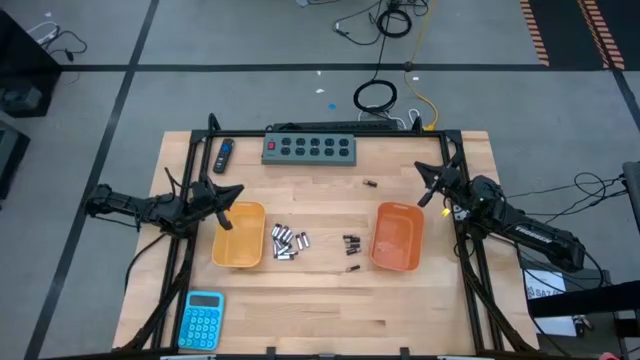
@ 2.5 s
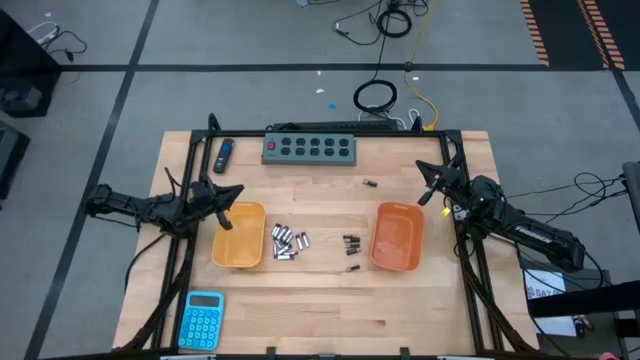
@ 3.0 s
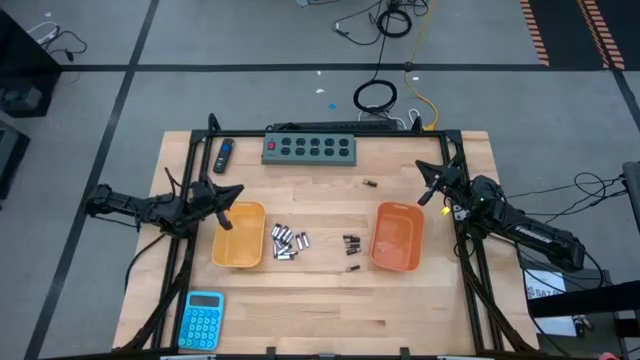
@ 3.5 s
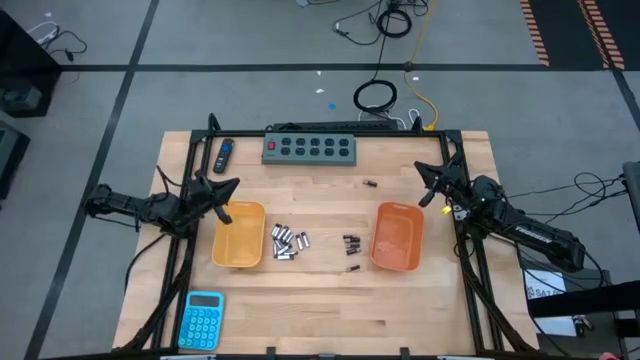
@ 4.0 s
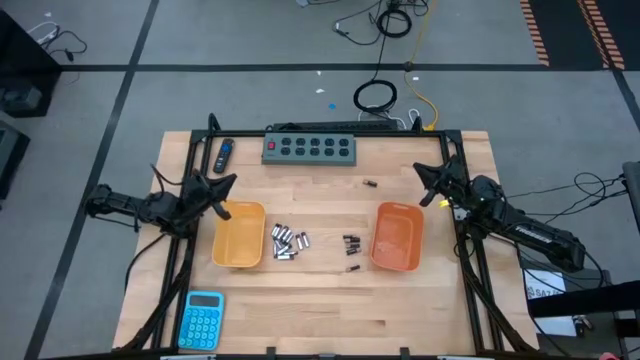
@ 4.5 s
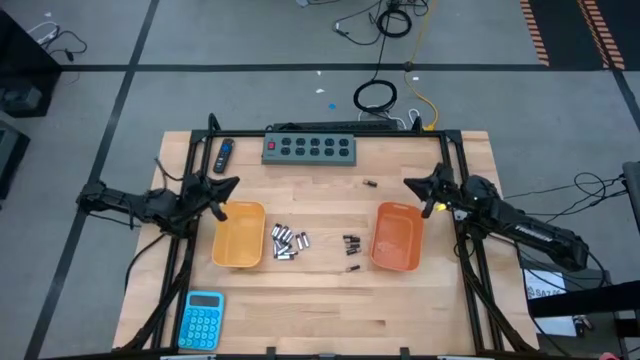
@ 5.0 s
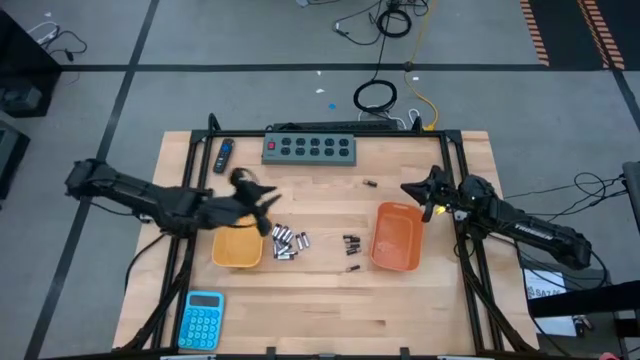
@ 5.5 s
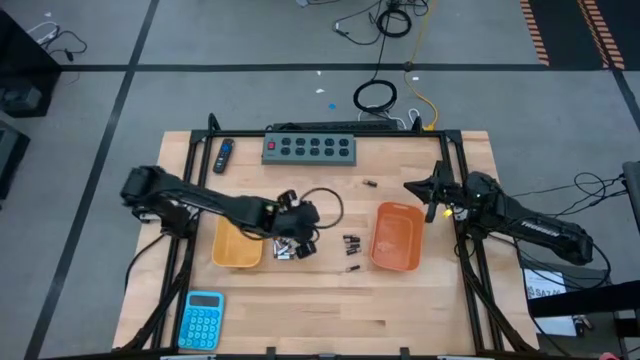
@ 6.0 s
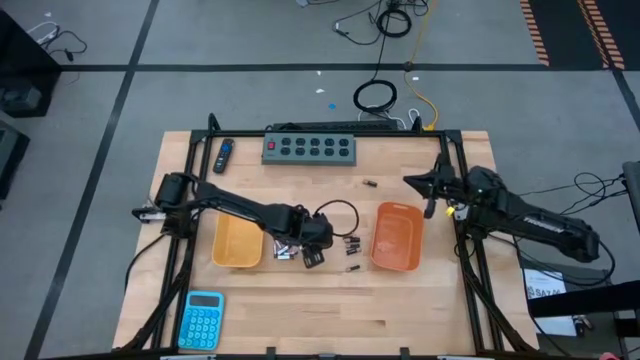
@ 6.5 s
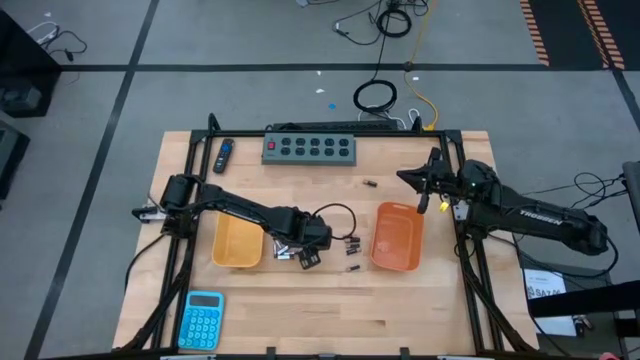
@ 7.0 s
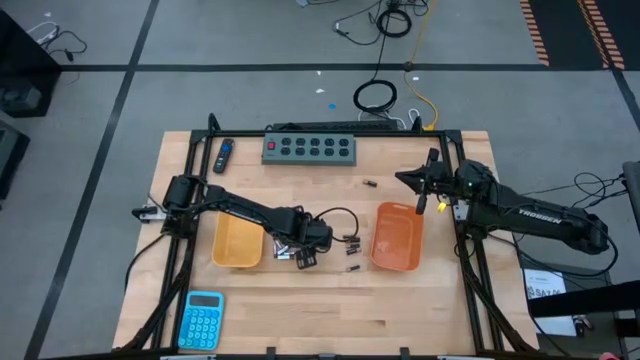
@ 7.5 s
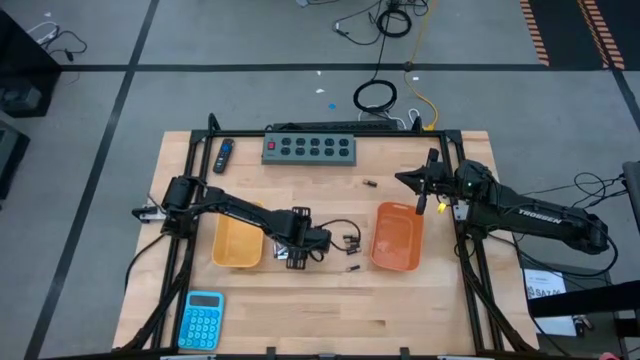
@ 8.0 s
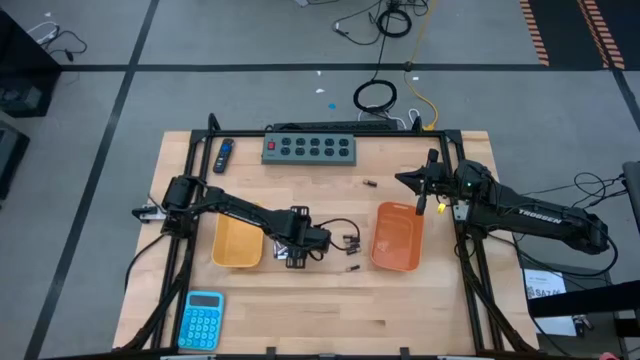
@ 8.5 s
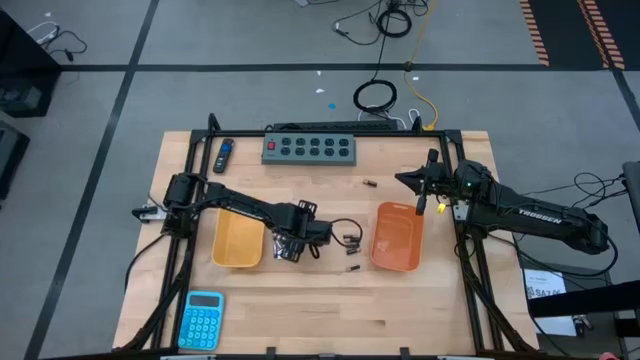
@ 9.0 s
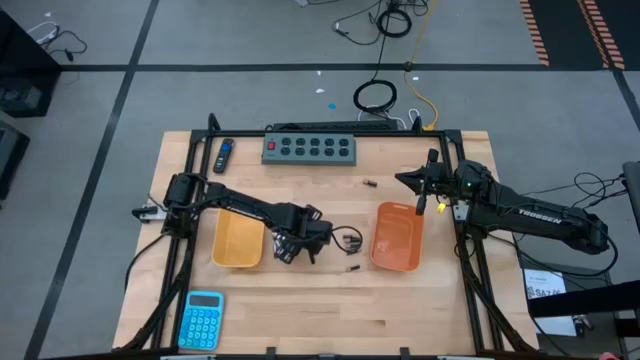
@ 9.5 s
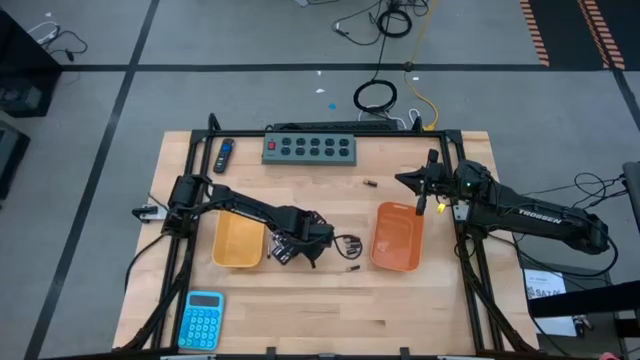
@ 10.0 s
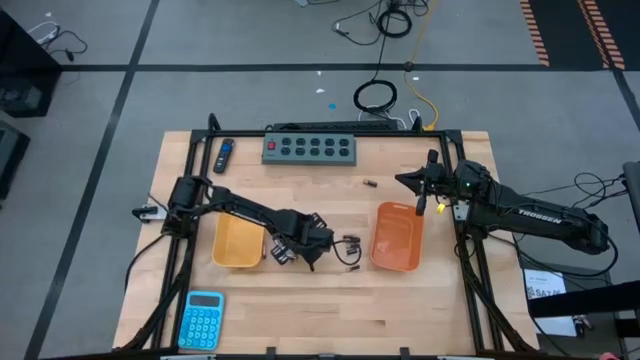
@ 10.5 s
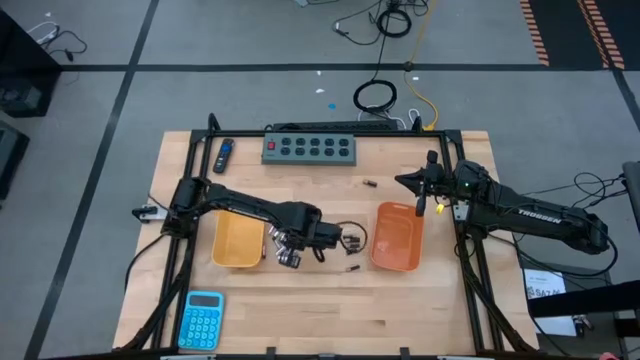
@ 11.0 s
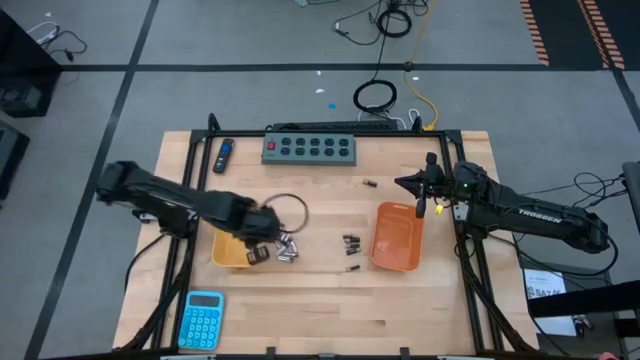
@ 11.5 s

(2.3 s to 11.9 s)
Task: Sort batteries
Put the silver battery into the yellow bin

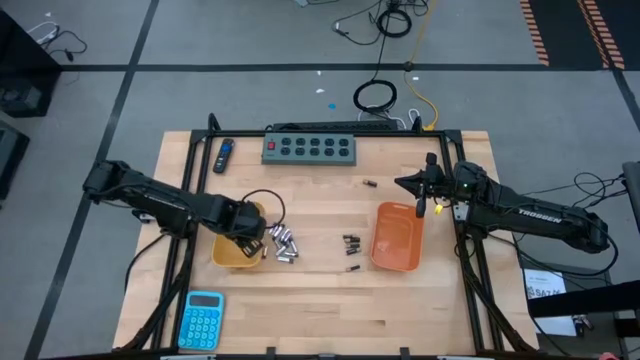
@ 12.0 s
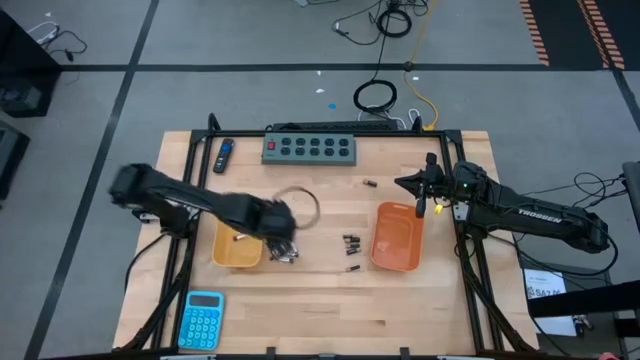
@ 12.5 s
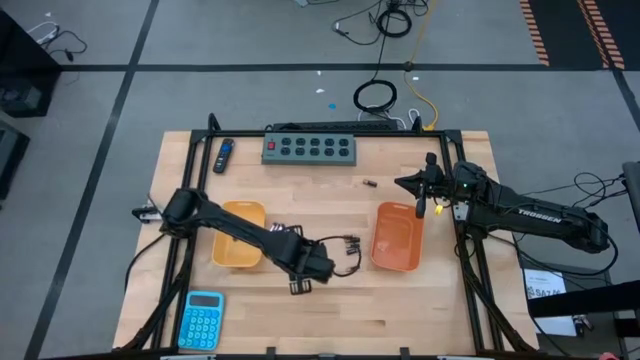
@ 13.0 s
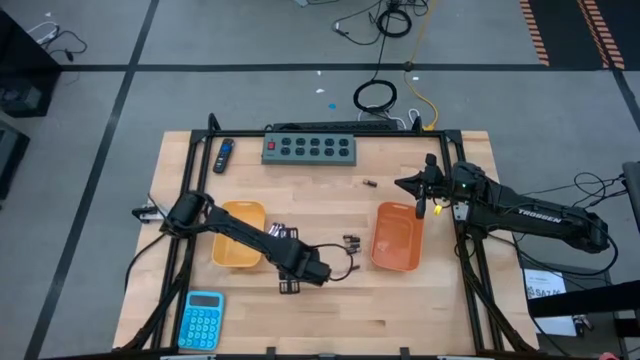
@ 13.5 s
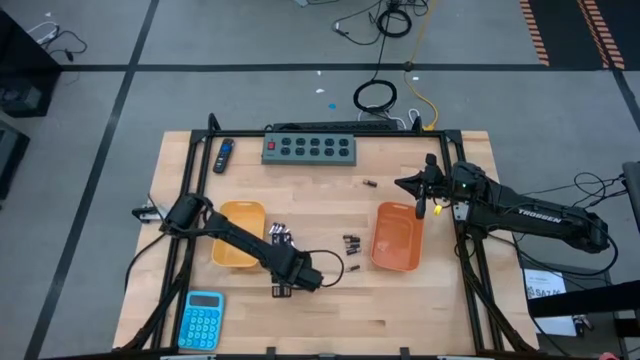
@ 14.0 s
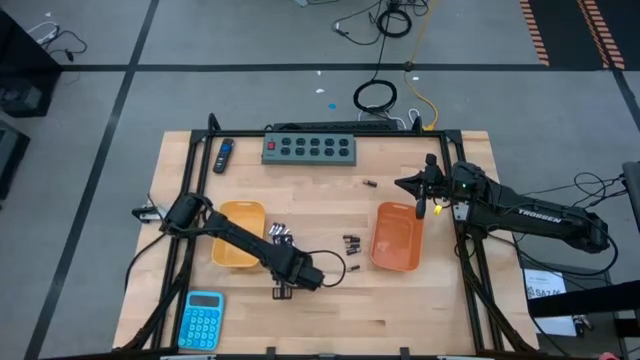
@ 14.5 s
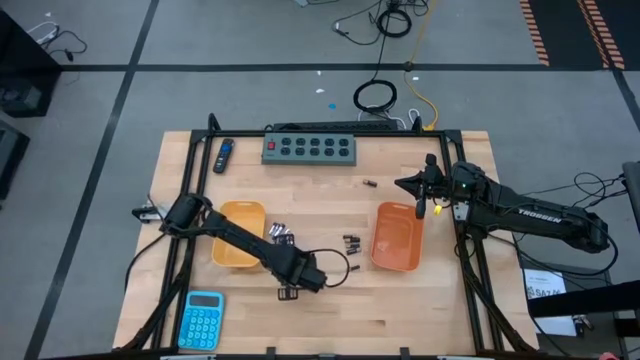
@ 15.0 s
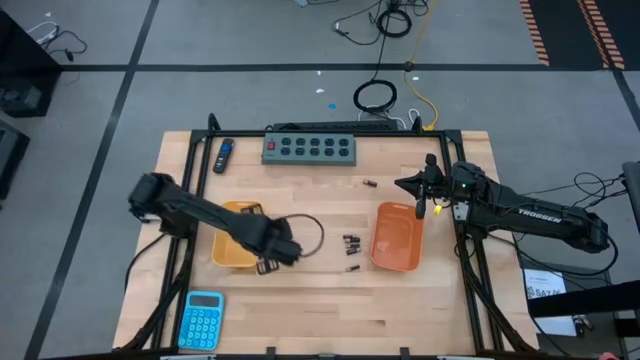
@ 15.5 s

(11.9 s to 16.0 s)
Put the silver battery into the yellow bin

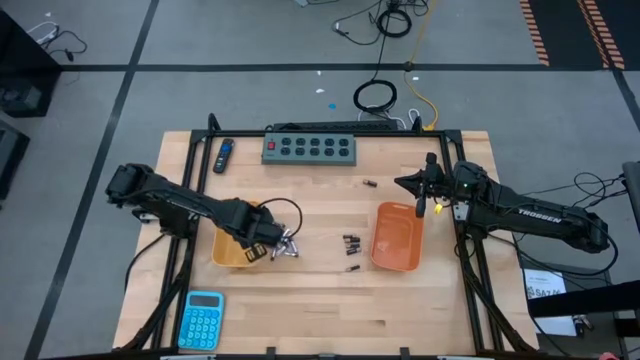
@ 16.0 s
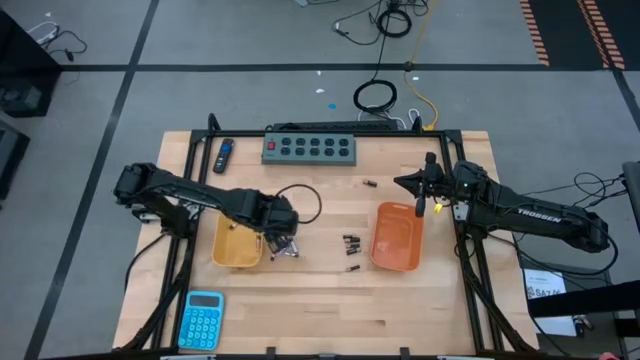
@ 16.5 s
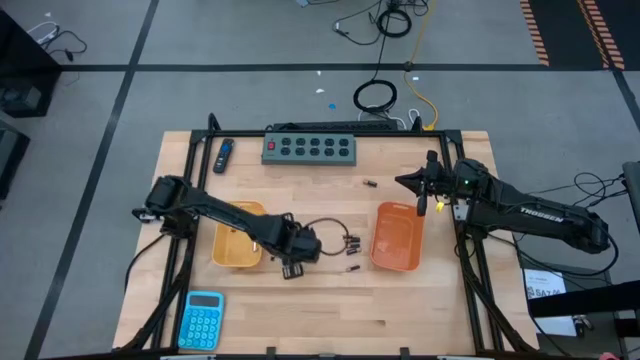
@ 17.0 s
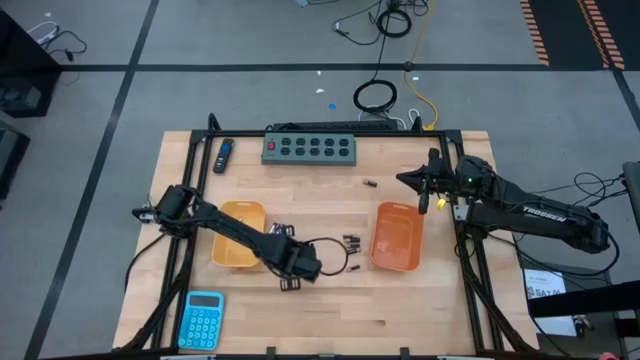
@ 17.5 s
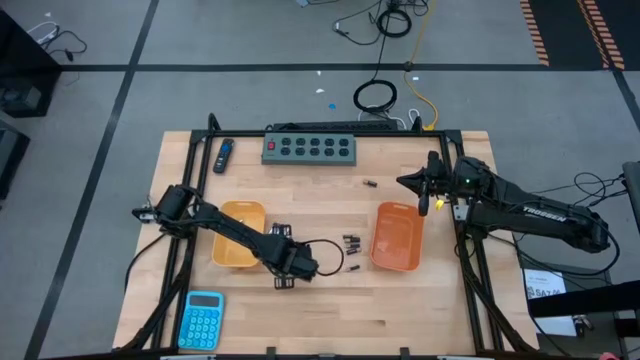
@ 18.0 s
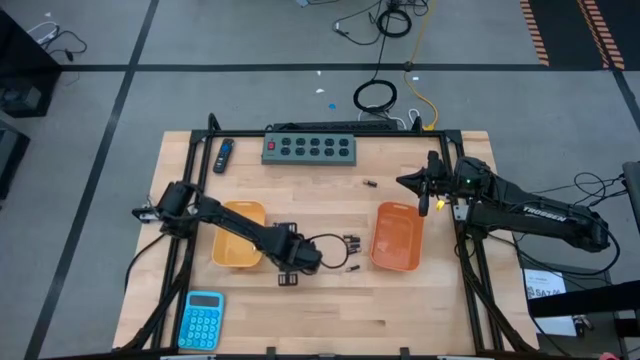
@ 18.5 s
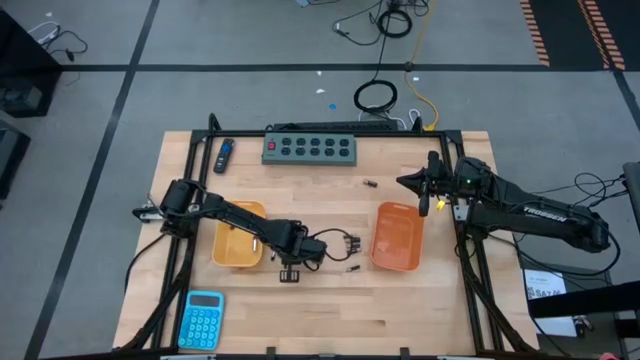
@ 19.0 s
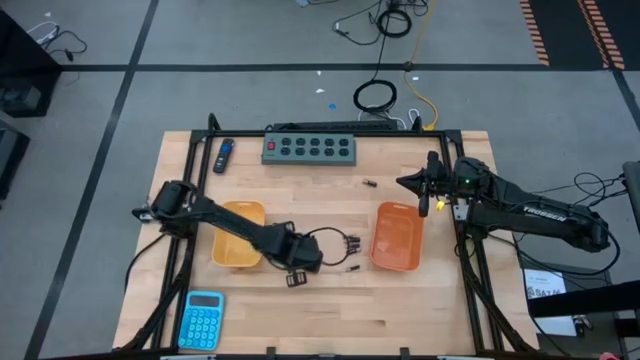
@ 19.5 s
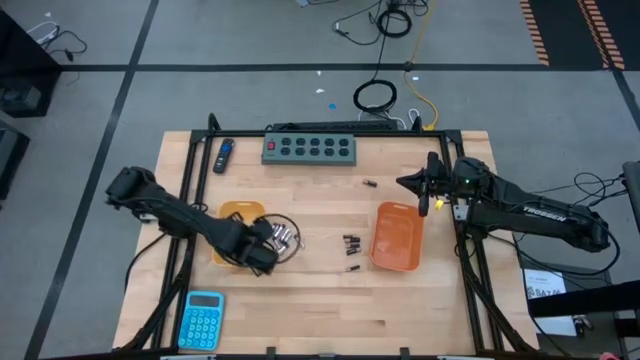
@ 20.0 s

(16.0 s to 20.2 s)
Put the silver battery into the yellow bin

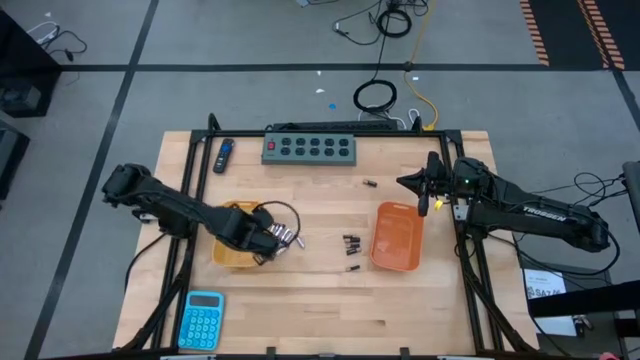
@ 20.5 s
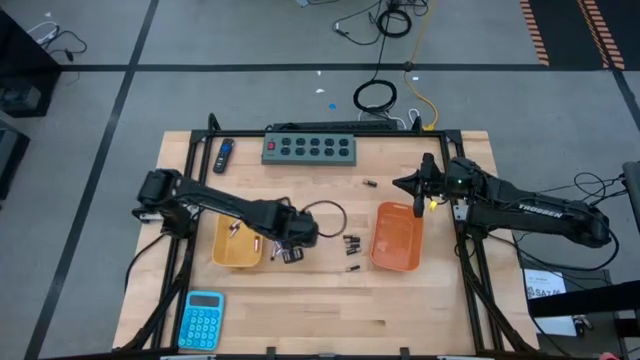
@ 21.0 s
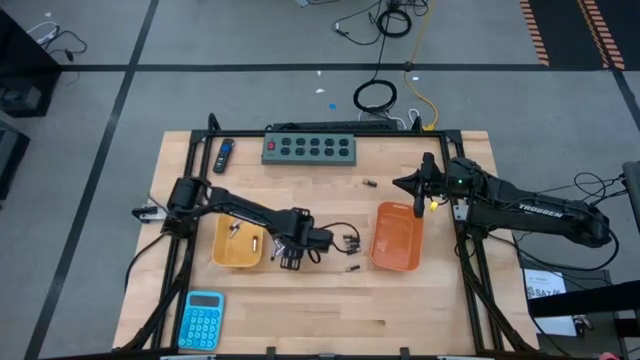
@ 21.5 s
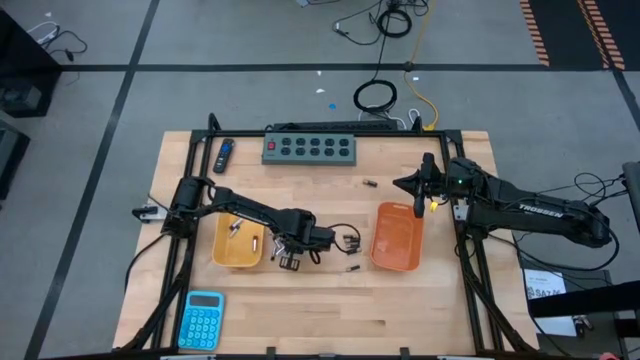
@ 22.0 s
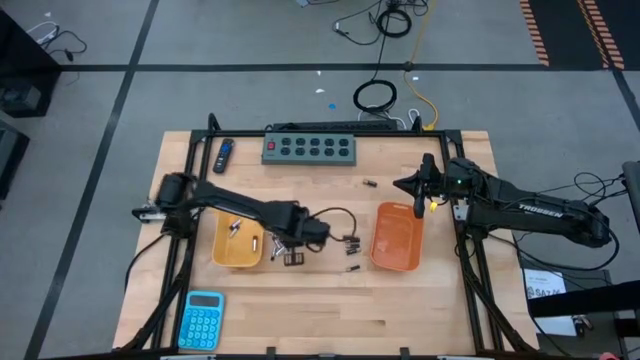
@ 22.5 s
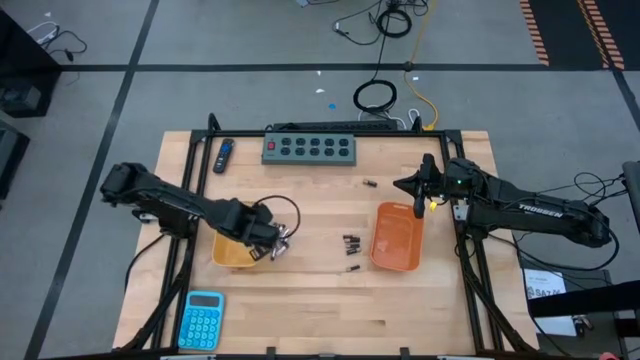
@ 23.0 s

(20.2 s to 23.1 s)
Put the silver battery into the yellow bin

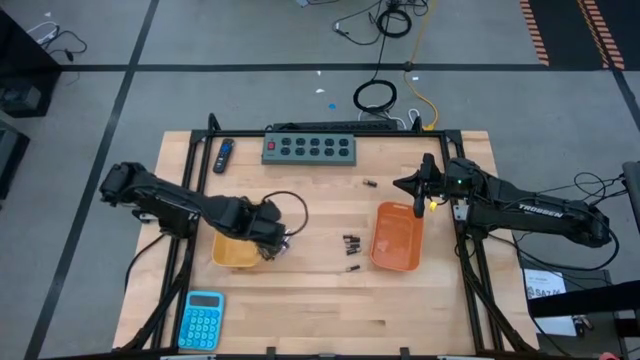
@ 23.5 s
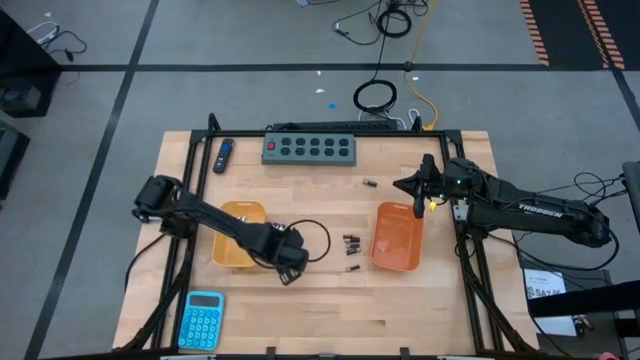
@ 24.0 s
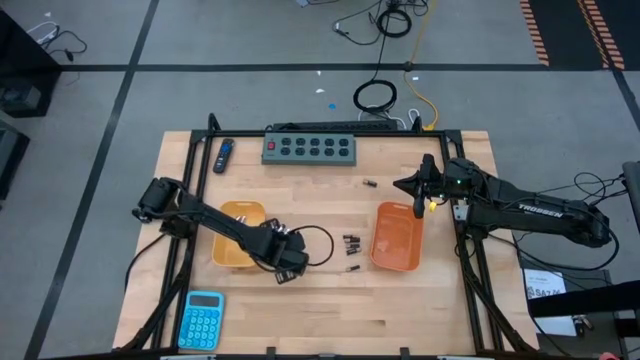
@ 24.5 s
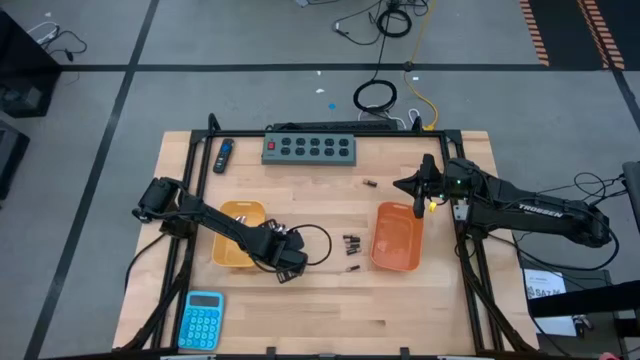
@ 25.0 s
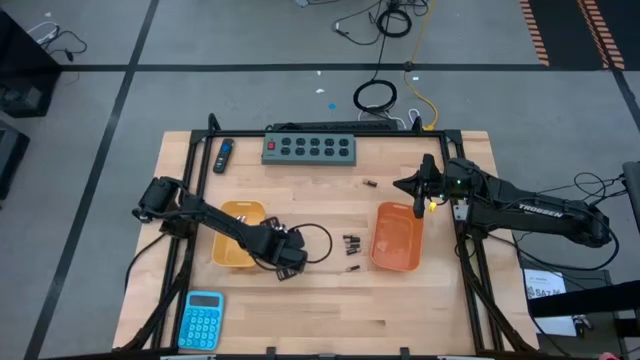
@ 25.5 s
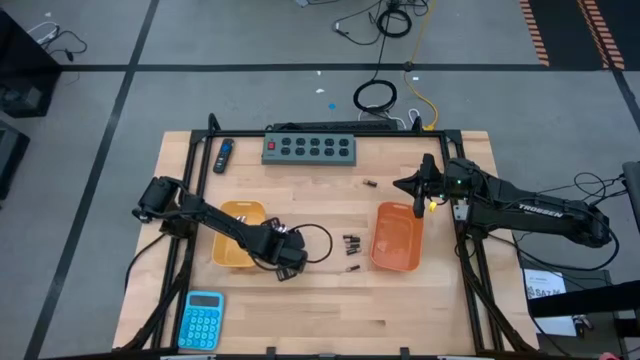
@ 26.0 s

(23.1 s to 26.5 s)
Put the silver battery into the yellow bin
